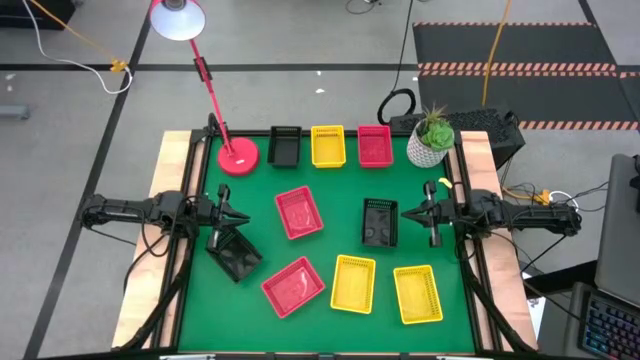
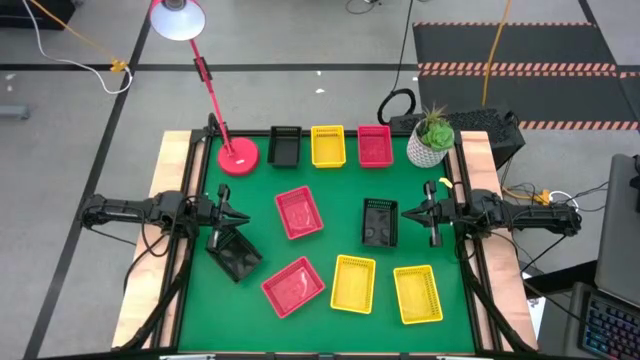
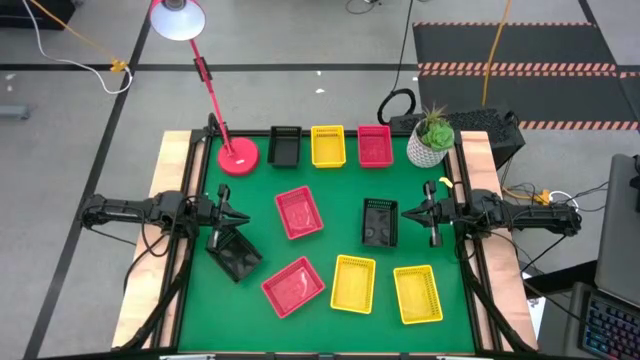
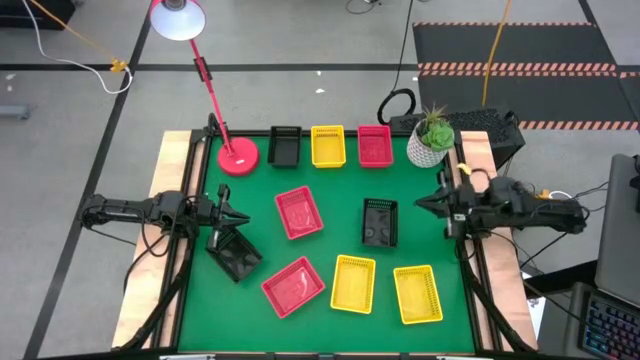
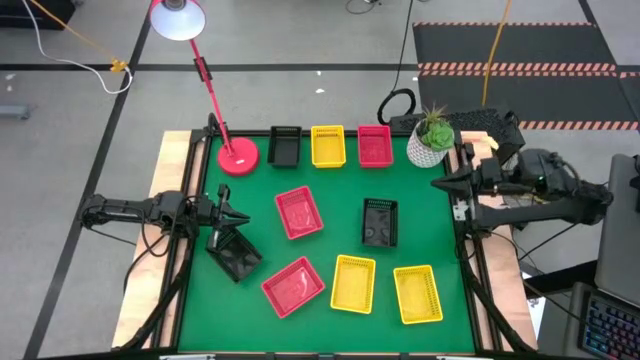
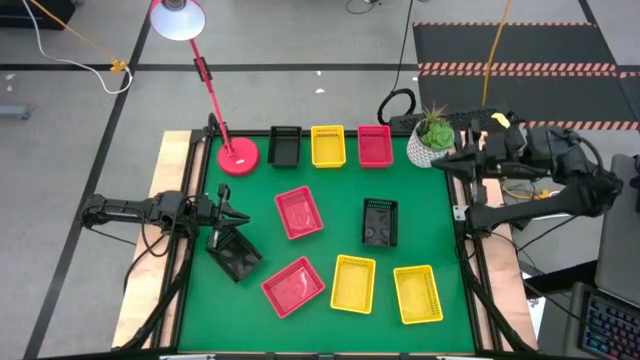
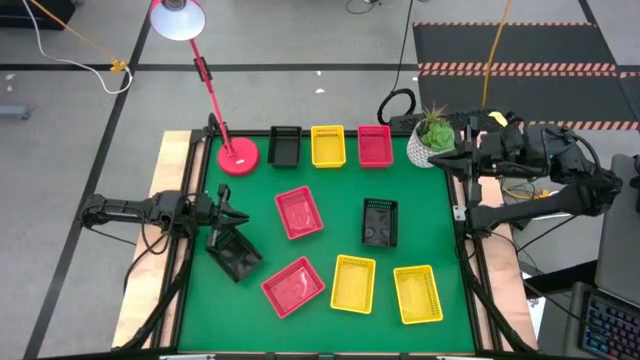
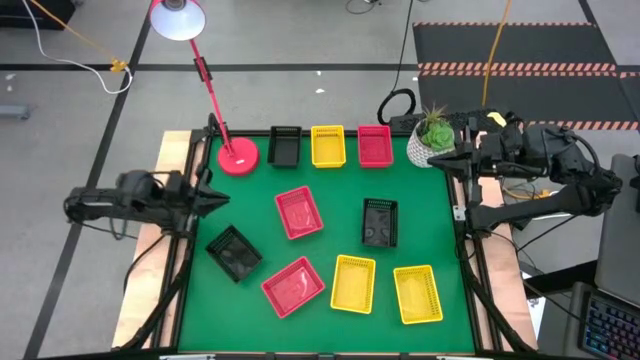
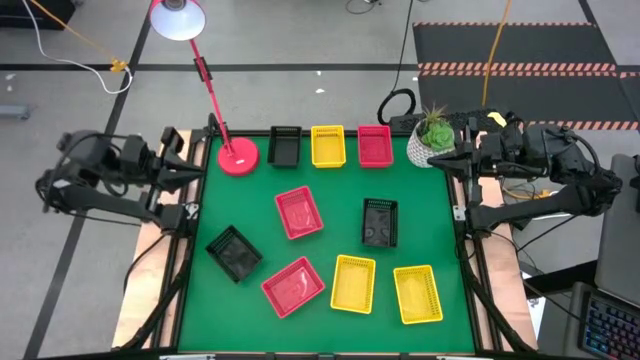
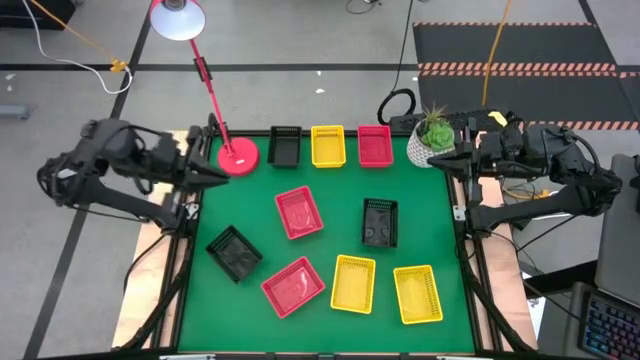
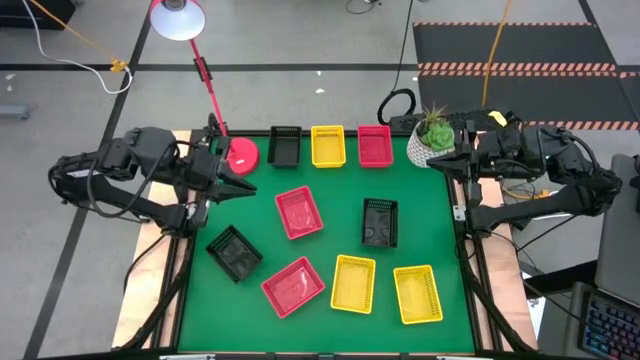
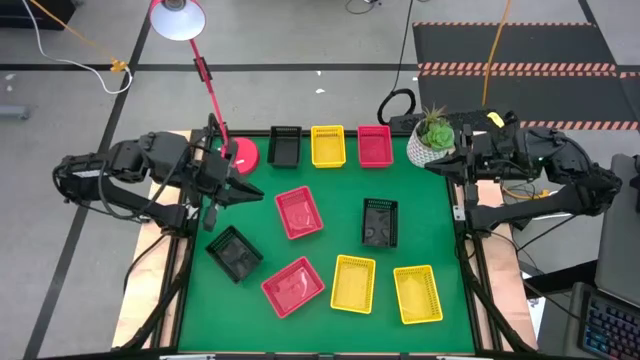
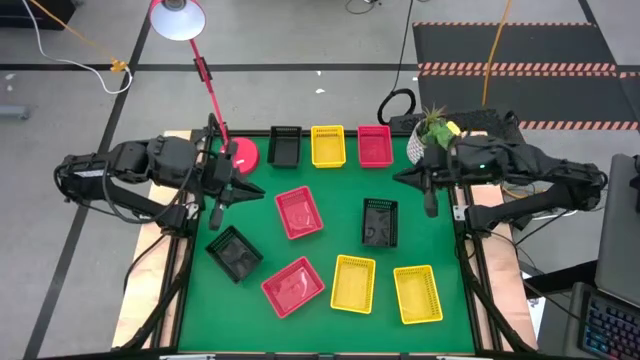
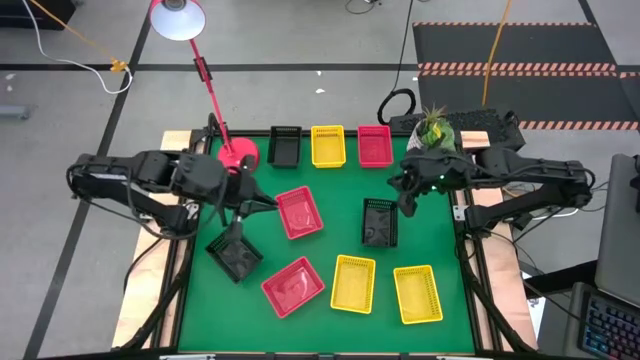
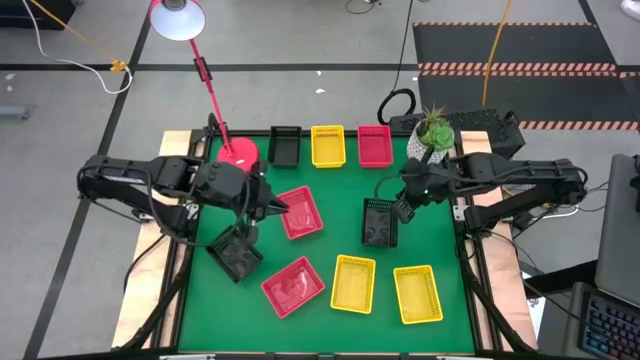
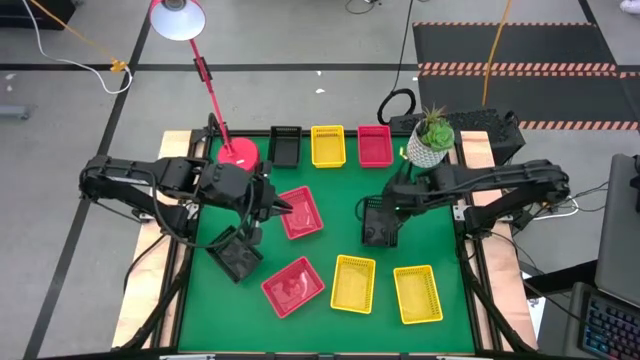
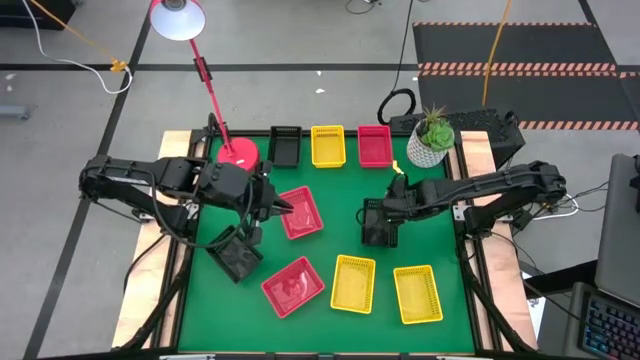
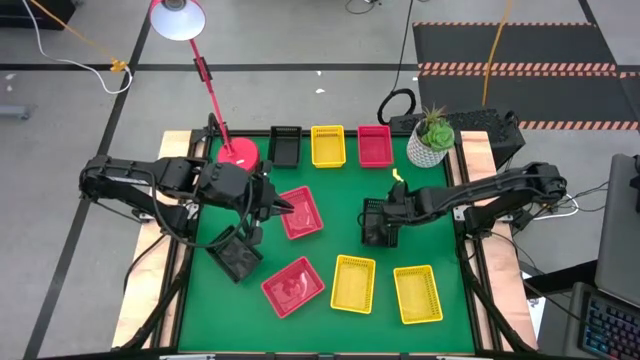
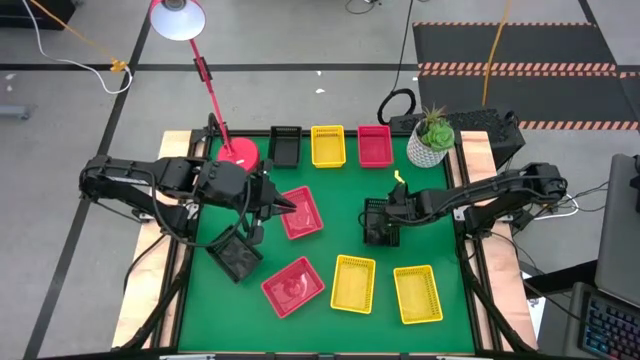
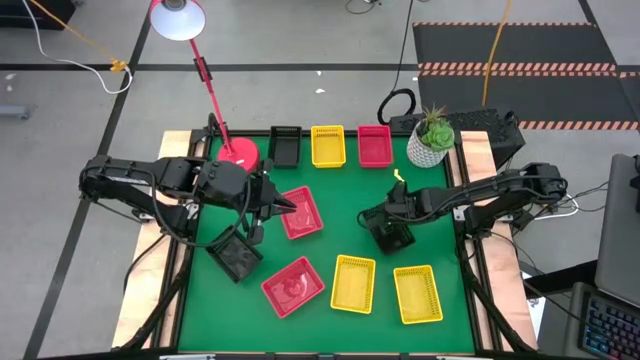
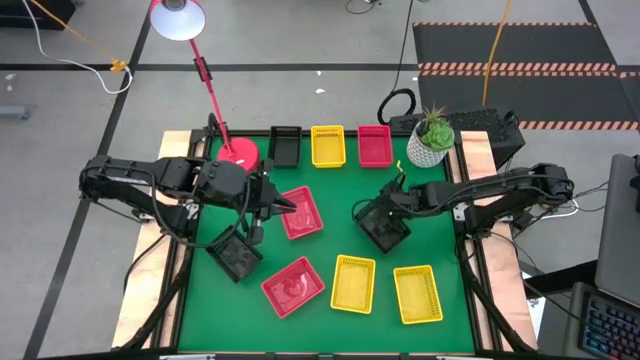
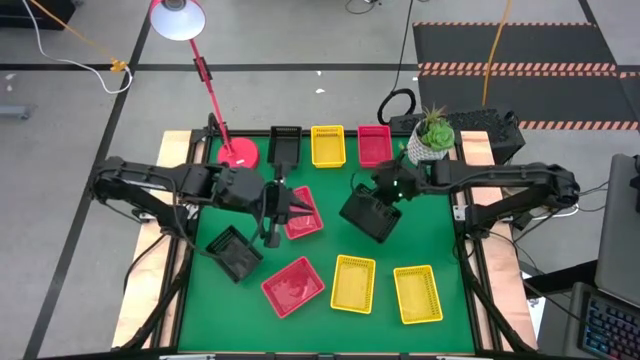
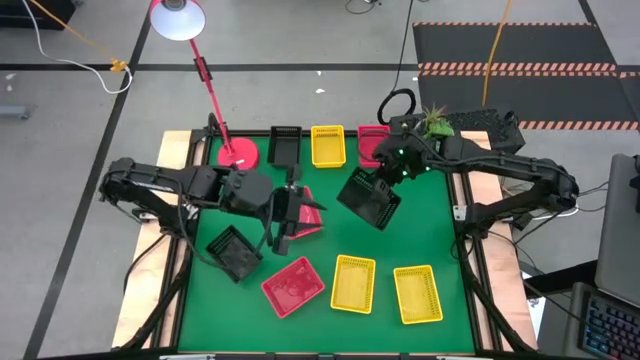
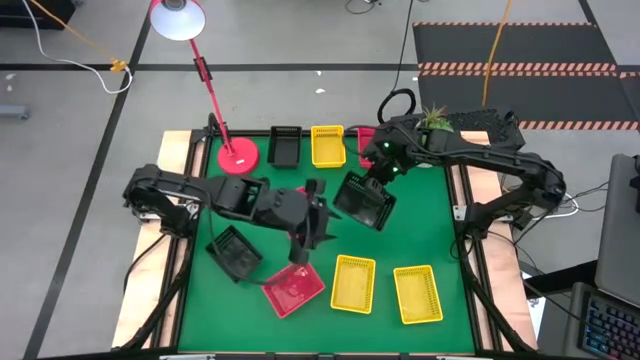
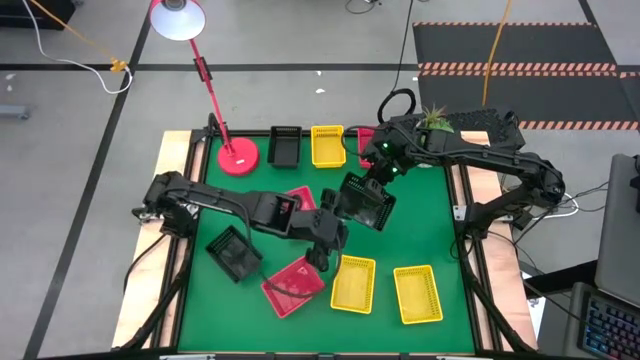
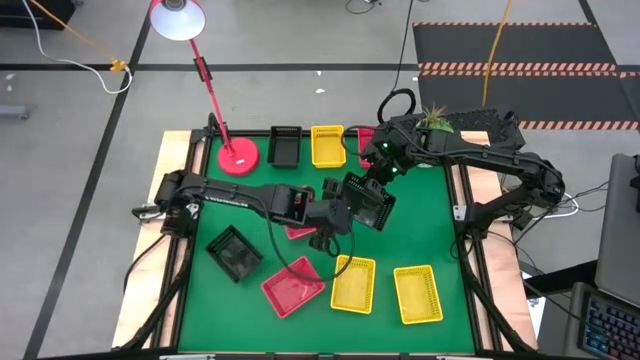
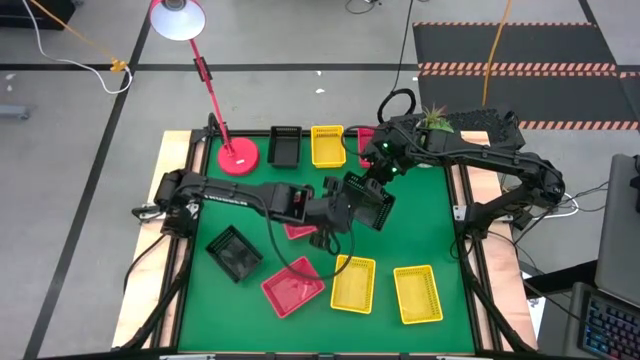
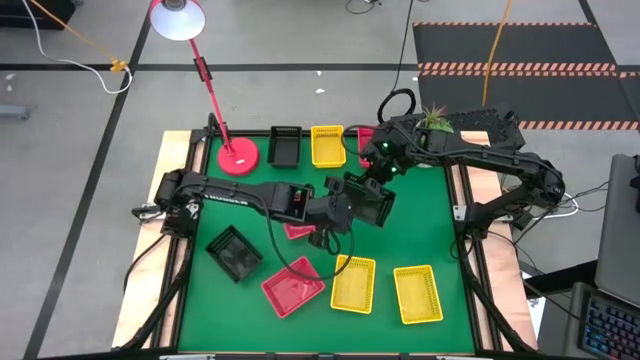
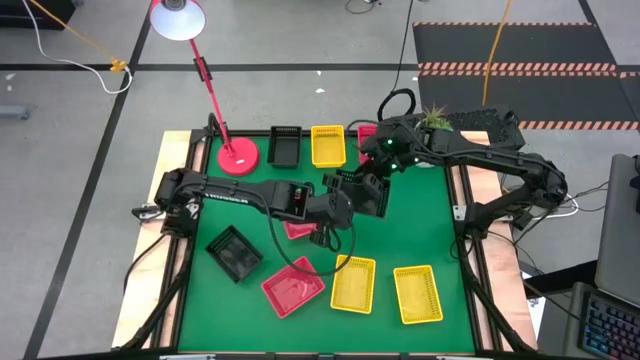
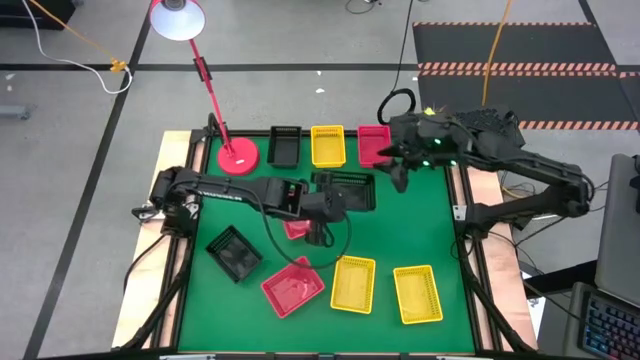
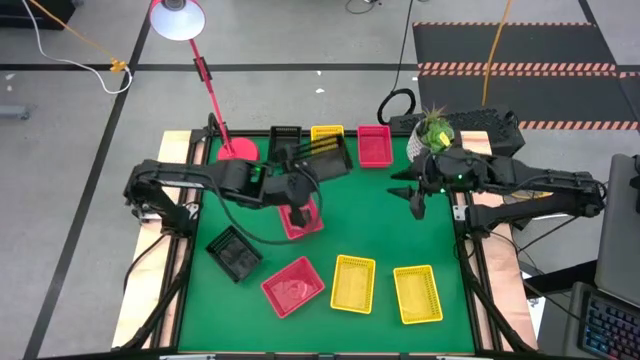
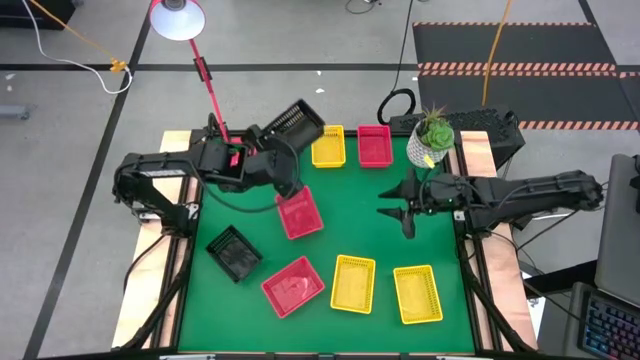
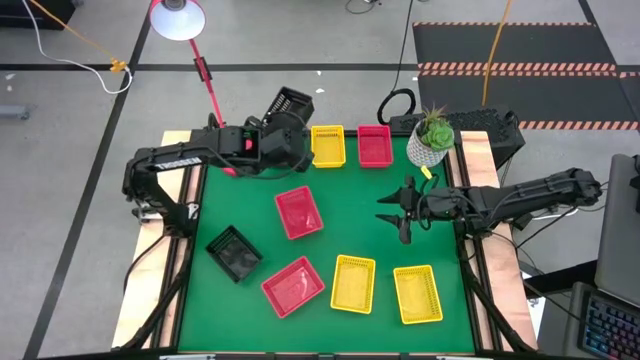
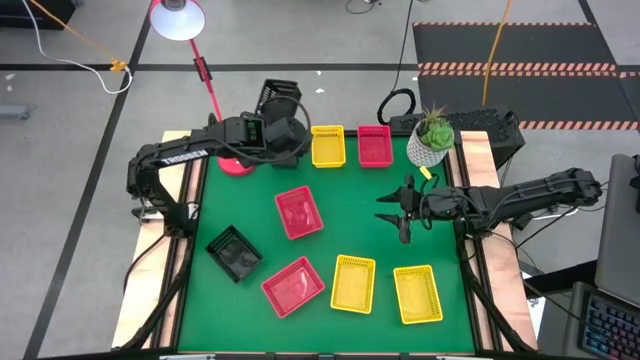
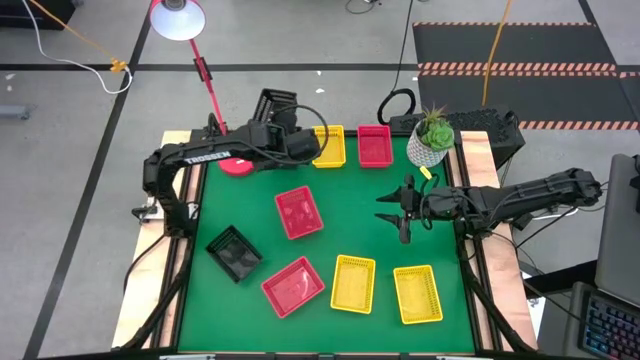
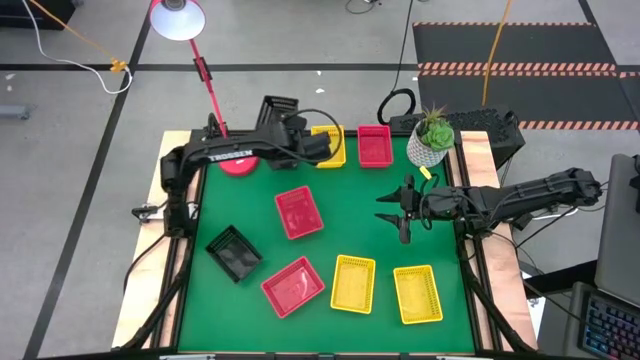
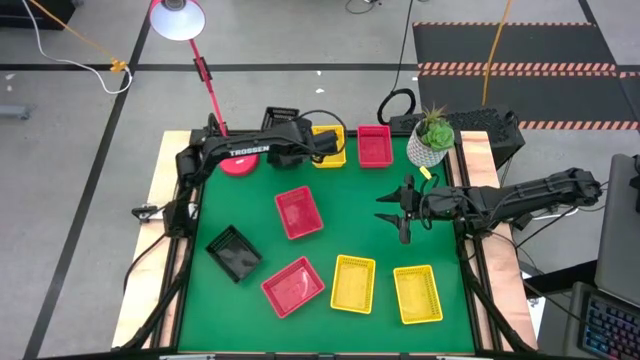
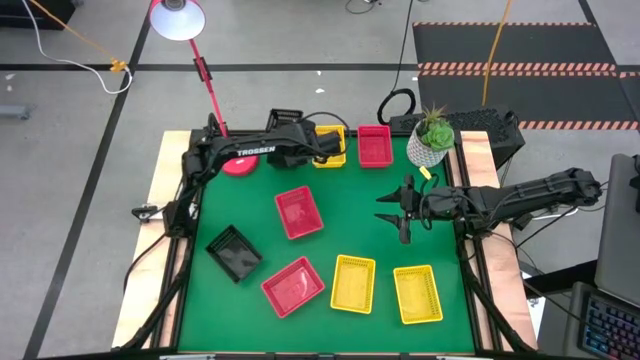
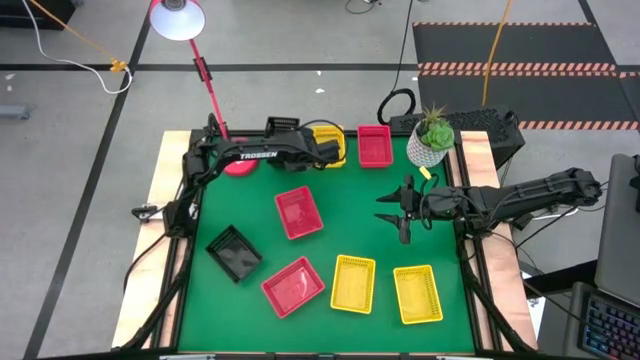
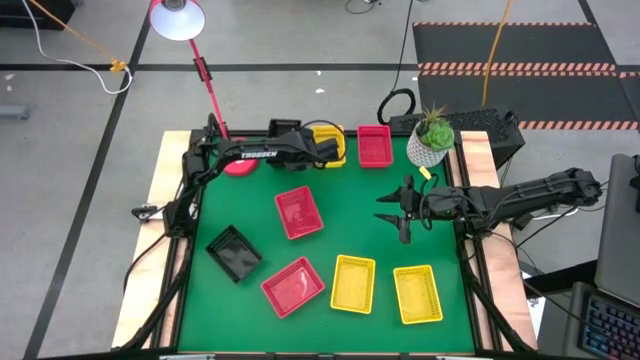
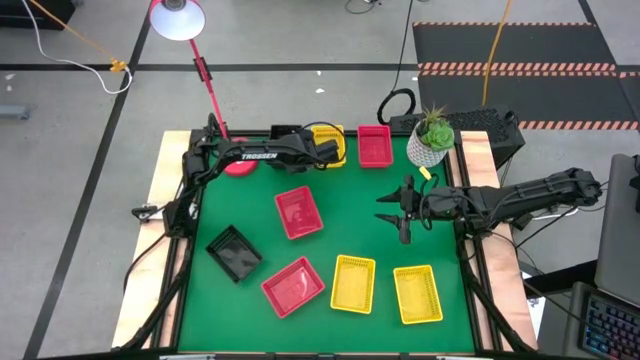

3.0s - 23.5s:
Stack the bottom right black bin on the top black bin
